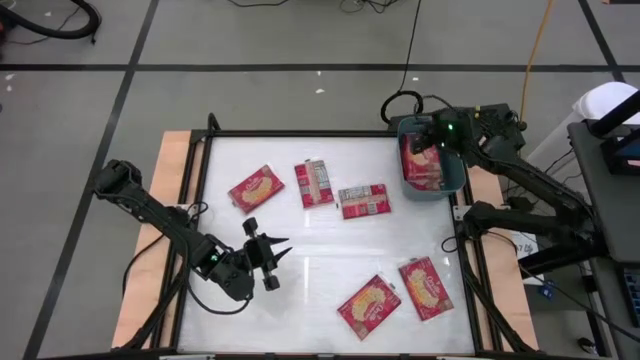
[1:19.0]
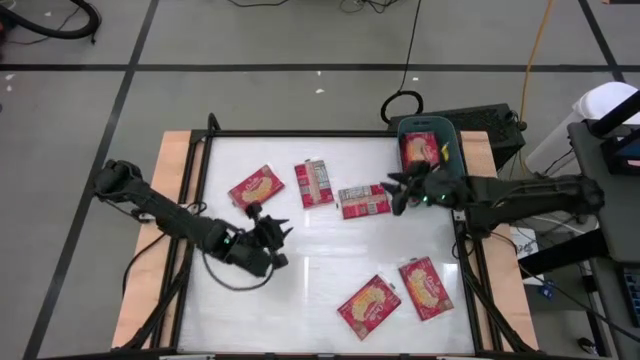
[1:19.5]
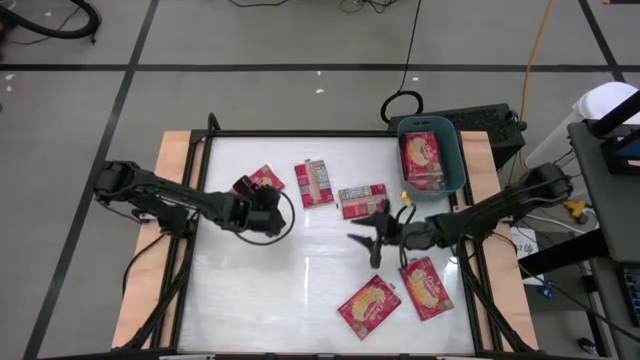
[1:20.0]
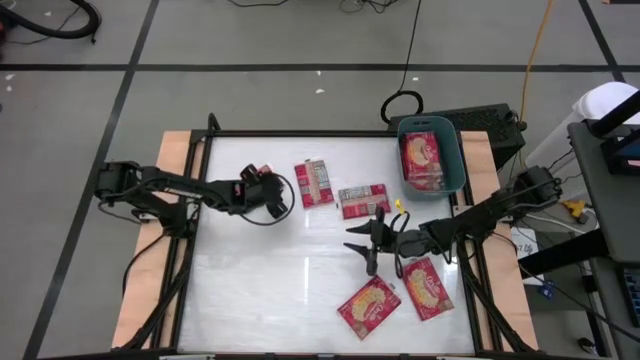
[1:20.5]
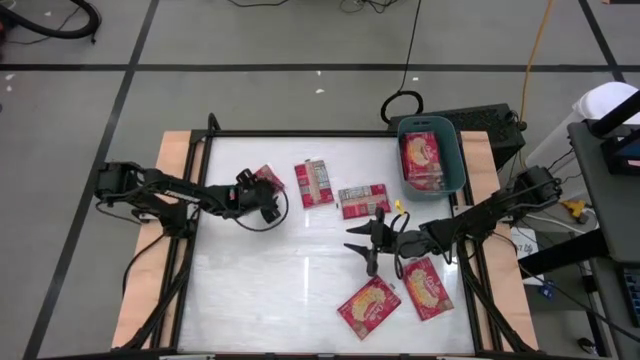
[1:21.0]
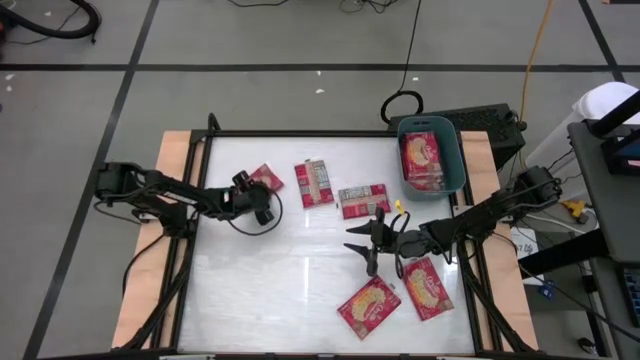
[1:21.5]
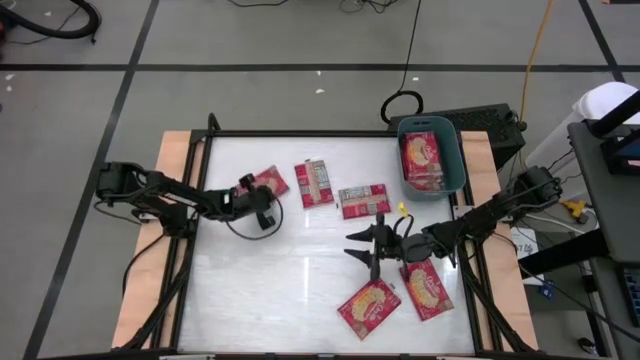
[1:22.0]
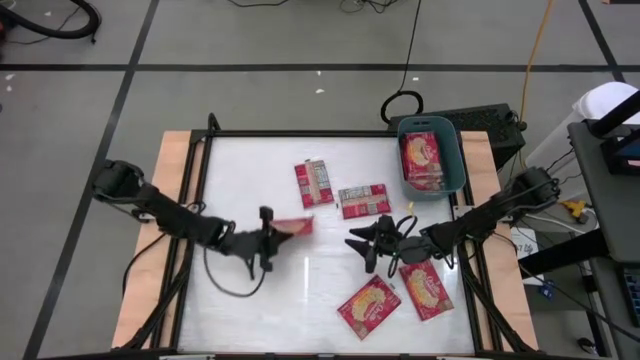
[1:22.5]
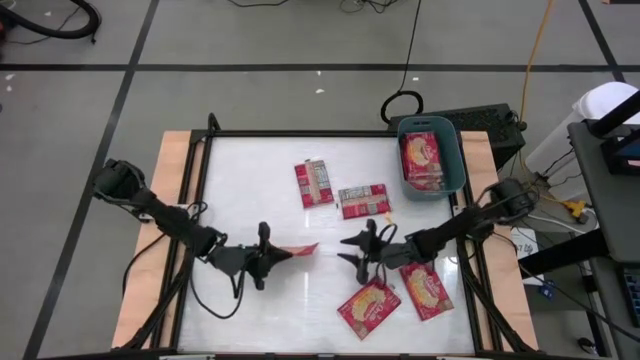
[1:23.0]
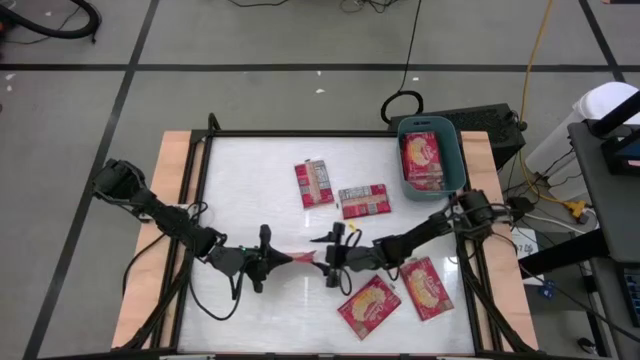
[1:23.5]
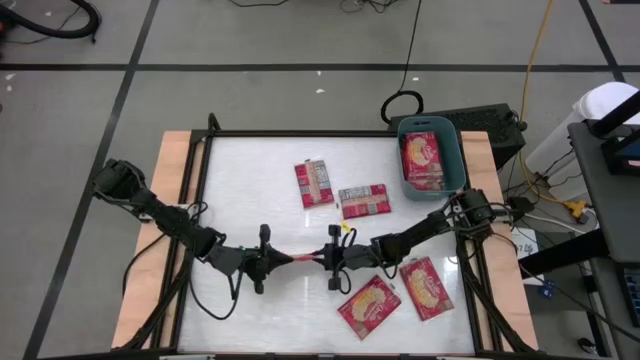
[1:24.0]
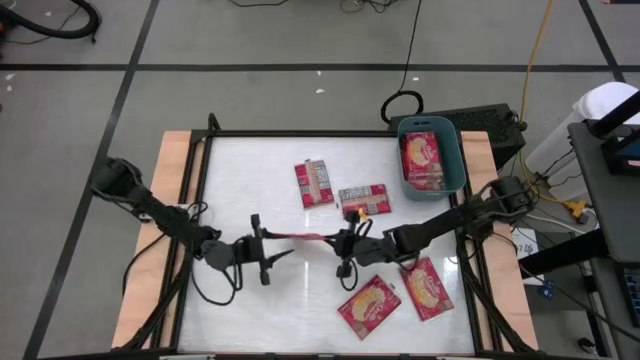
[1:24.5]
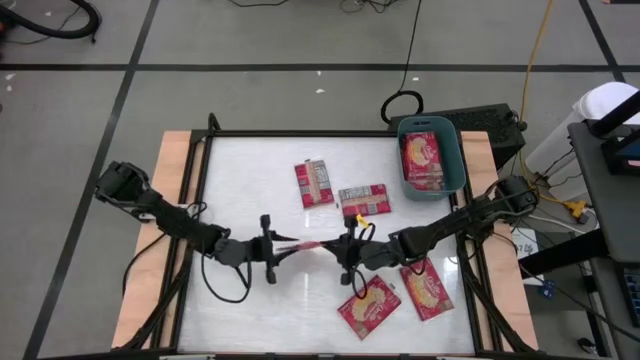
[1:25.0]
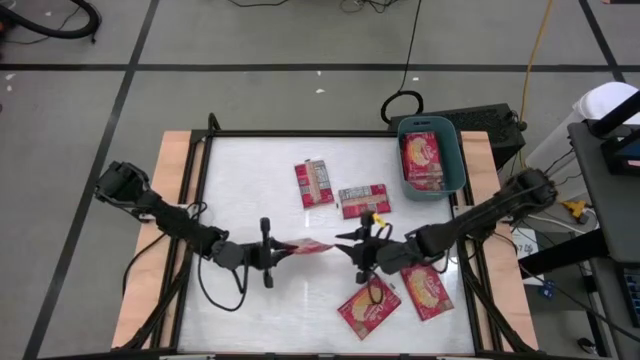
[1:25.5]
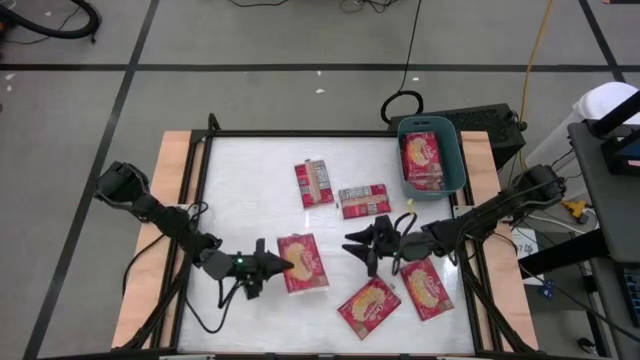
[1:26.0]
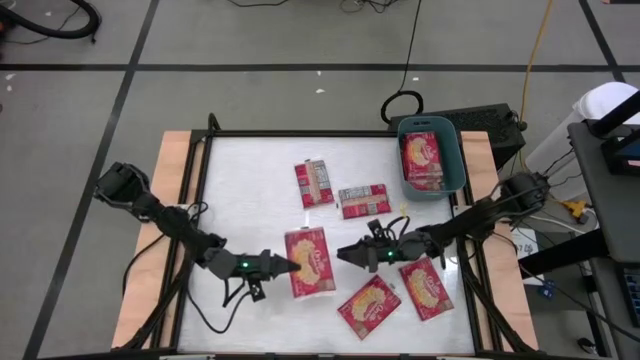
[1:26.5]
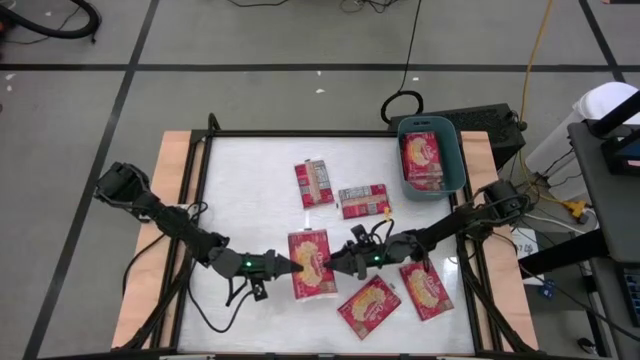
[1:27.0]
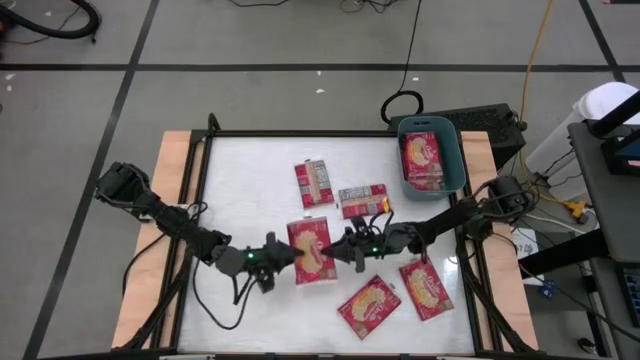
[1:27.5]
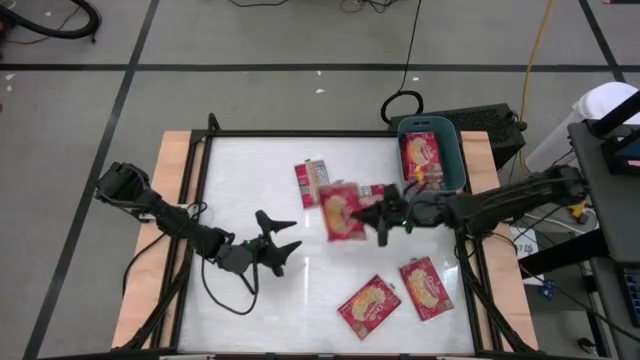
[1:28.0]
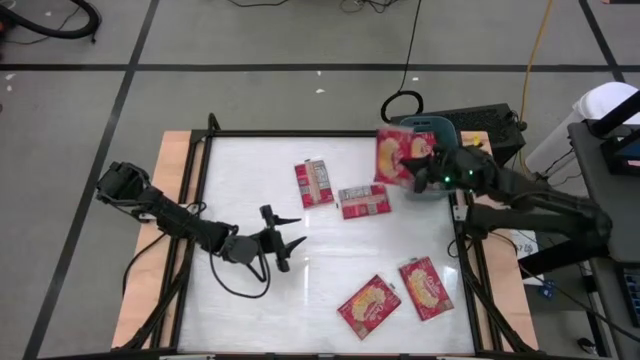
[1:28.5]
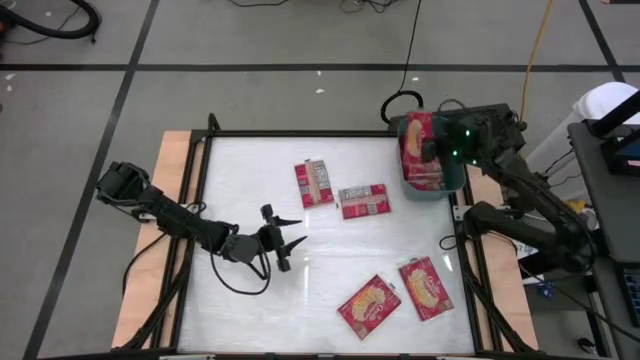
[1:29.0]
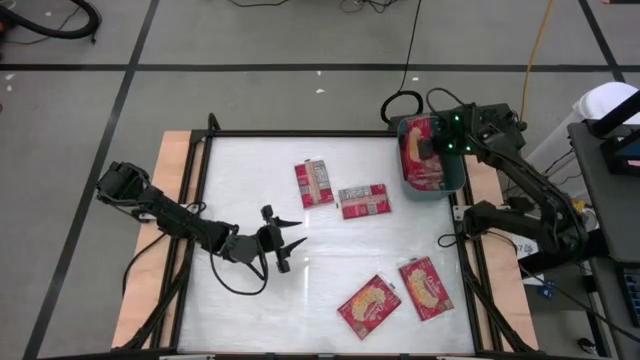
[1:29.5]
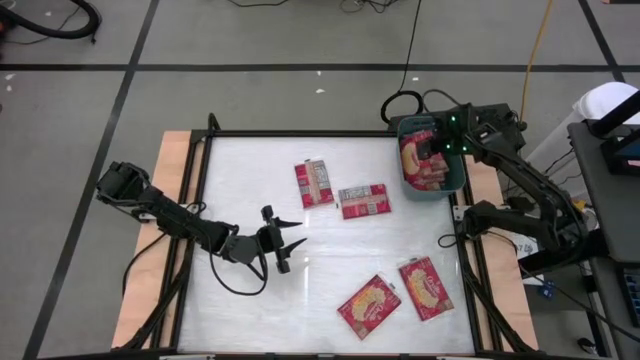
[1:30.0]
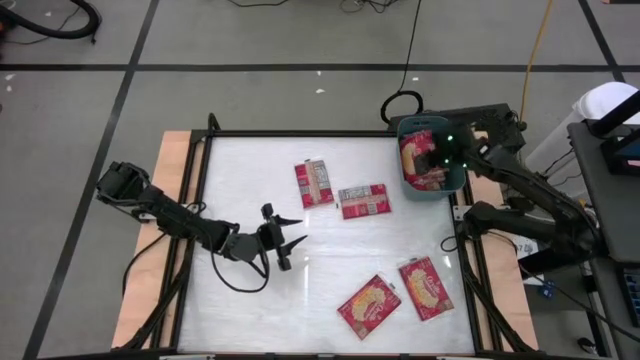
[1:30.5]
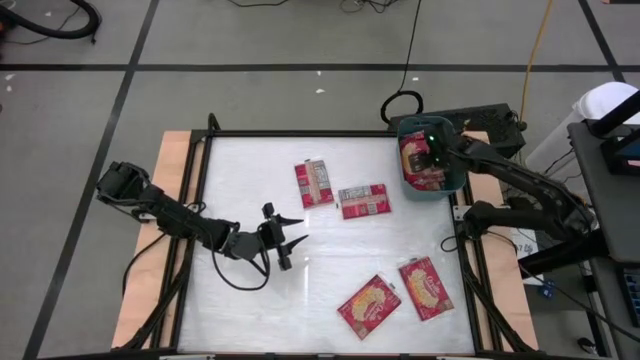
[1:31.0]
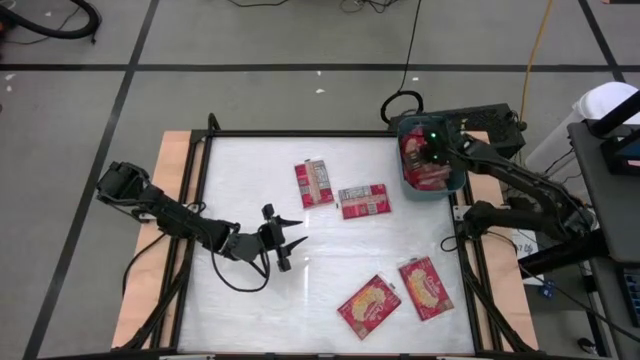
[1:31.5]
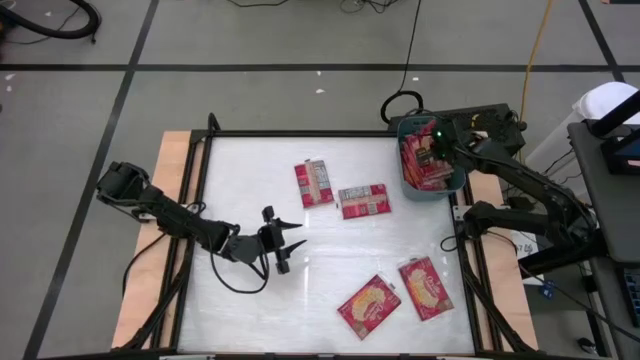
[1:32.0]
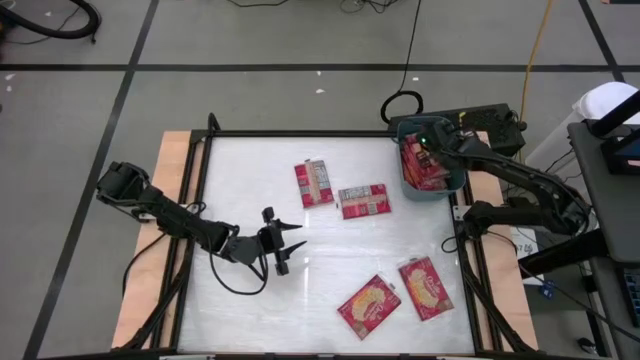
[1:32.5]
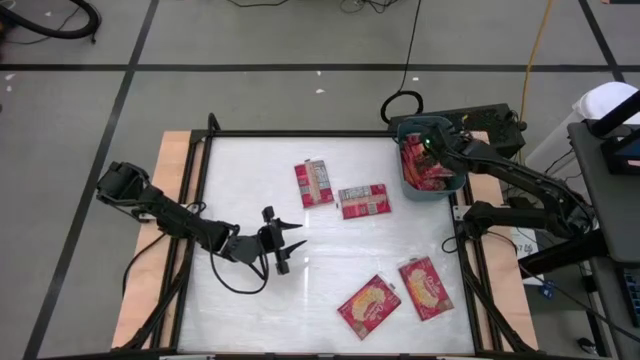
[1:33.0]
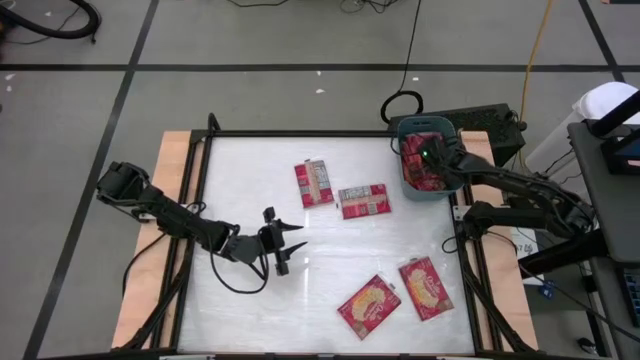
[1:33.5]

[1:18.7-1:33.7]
Task: Sort popcorn bags into baskets
Put the red popcorn bag into the blue bin

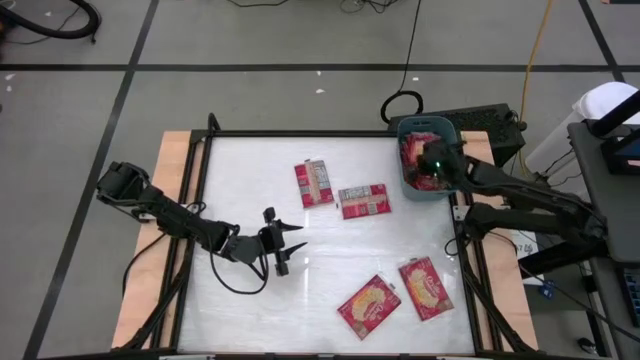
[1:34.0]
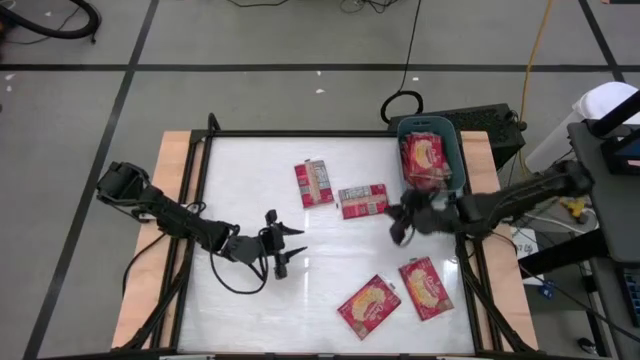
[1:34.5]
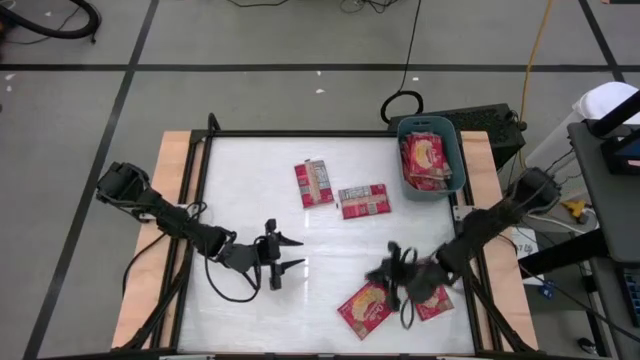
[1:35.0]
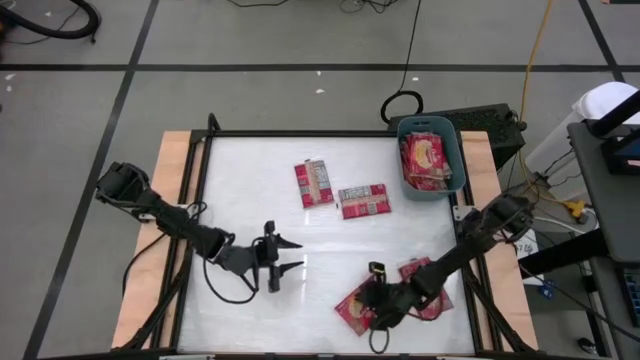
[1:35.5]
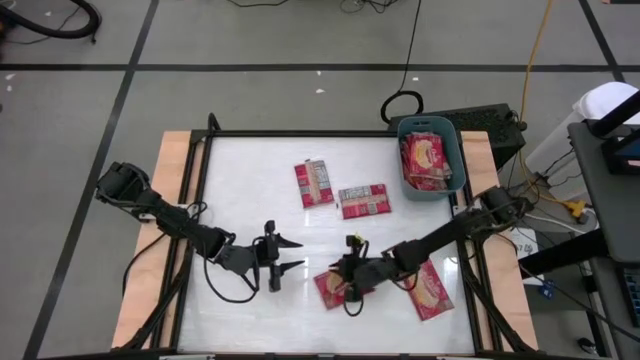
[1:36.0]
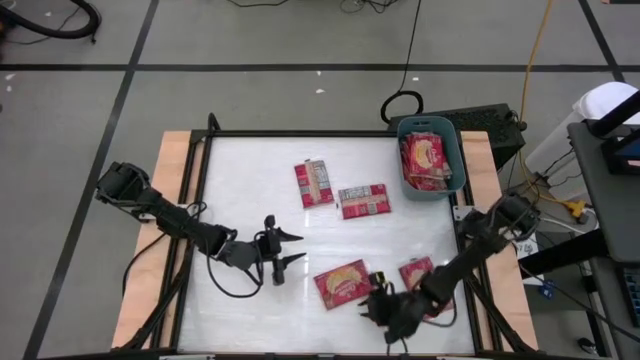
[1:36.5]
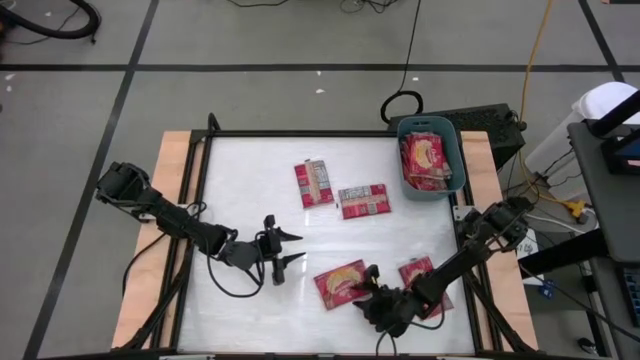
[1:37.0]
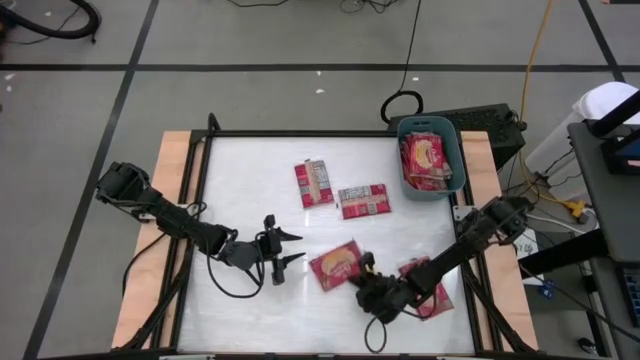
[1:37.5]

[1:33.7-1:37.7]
Put the red popcorn bag into the blue bin
